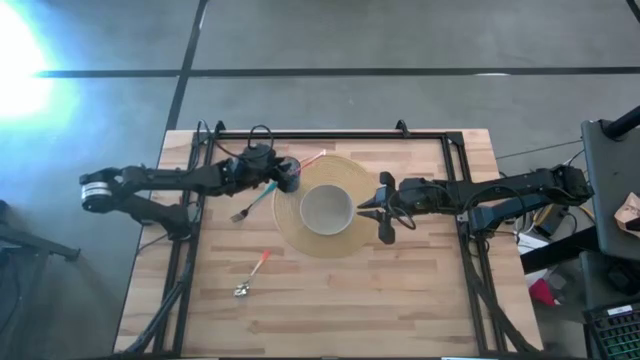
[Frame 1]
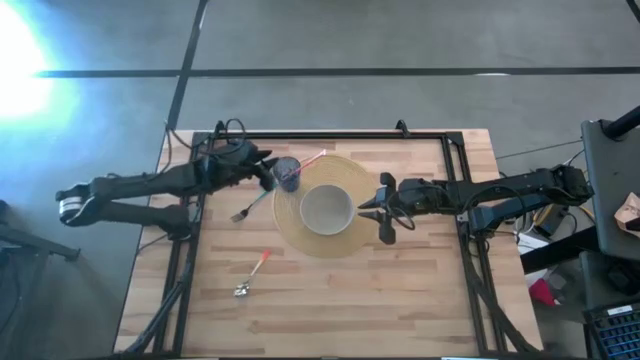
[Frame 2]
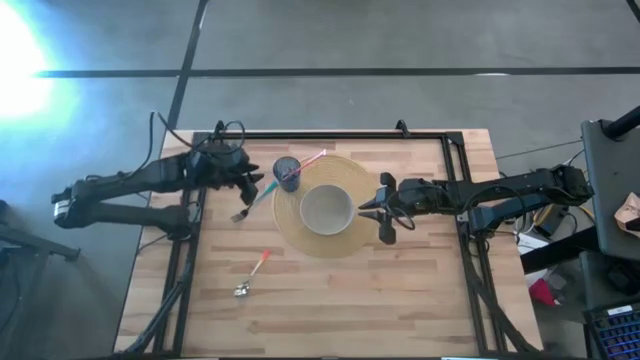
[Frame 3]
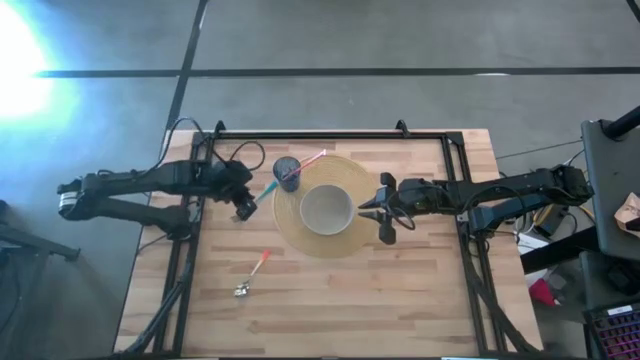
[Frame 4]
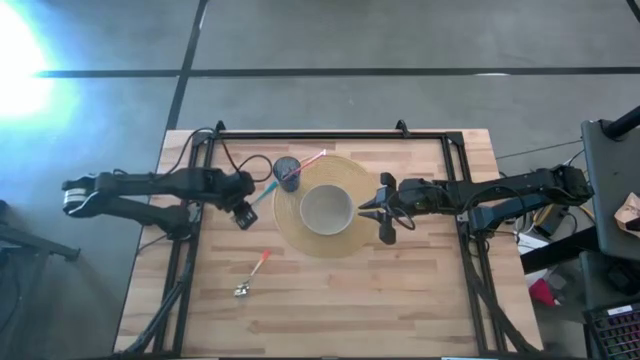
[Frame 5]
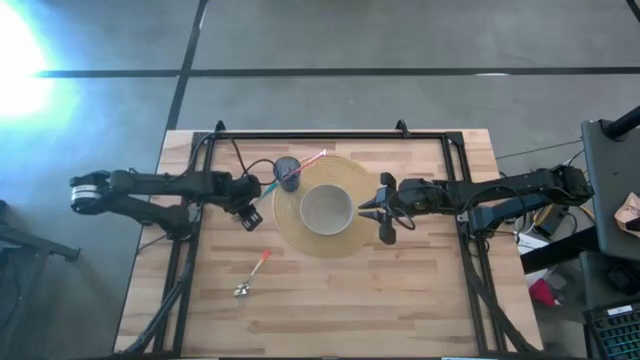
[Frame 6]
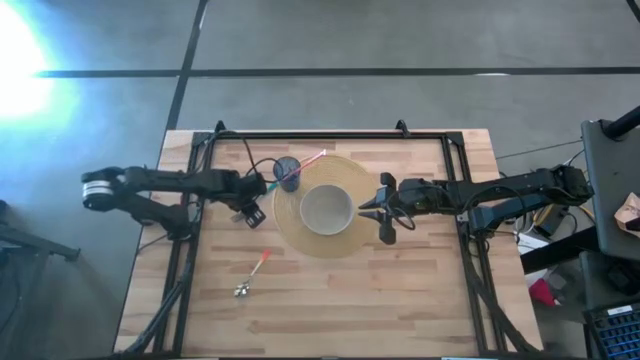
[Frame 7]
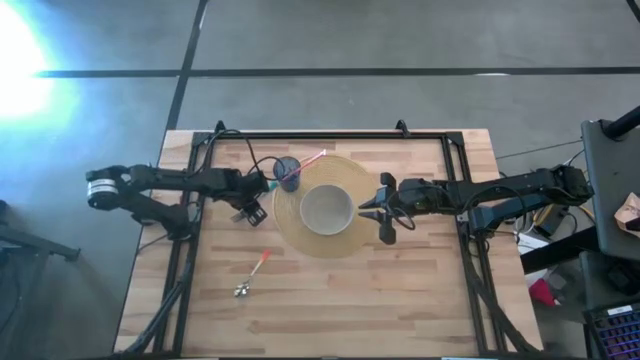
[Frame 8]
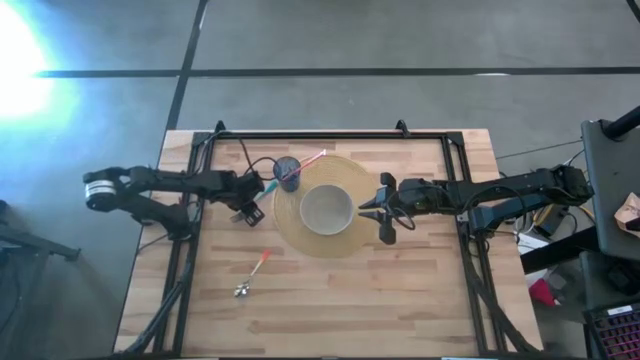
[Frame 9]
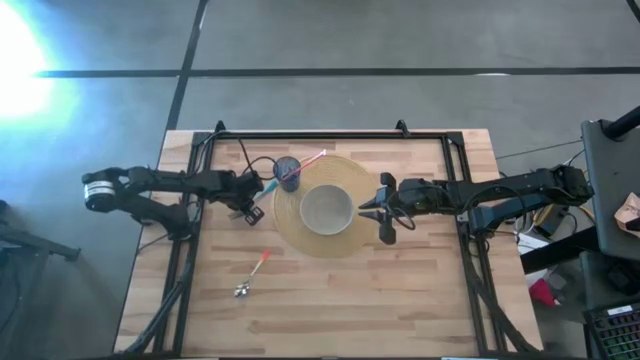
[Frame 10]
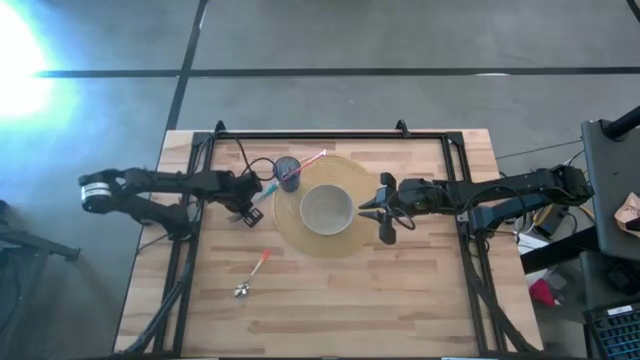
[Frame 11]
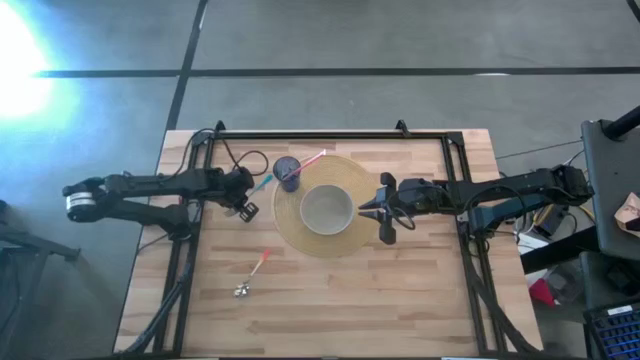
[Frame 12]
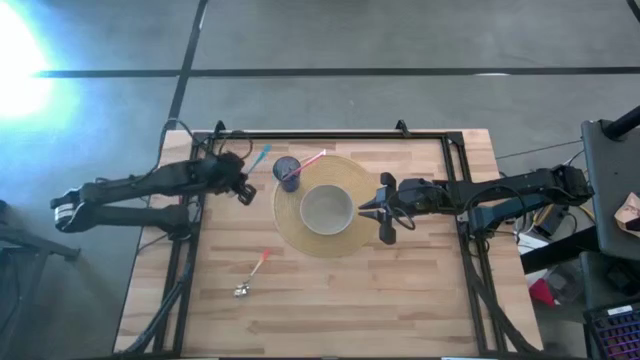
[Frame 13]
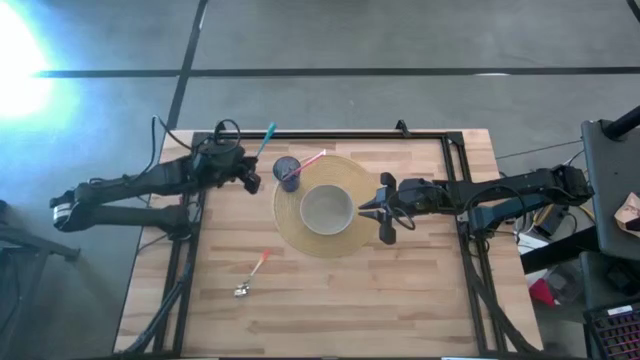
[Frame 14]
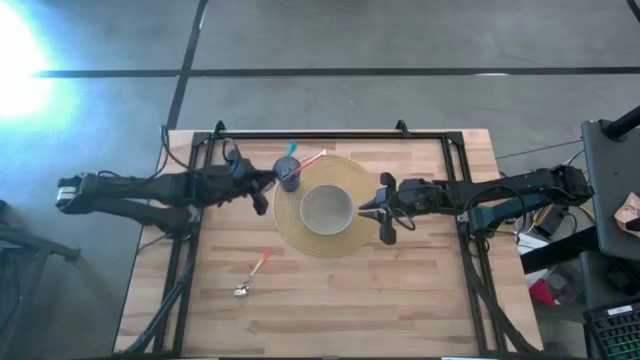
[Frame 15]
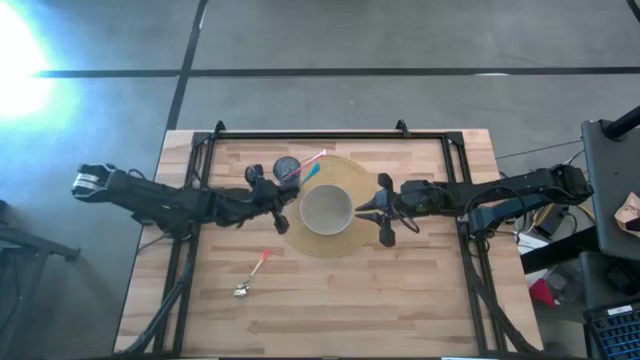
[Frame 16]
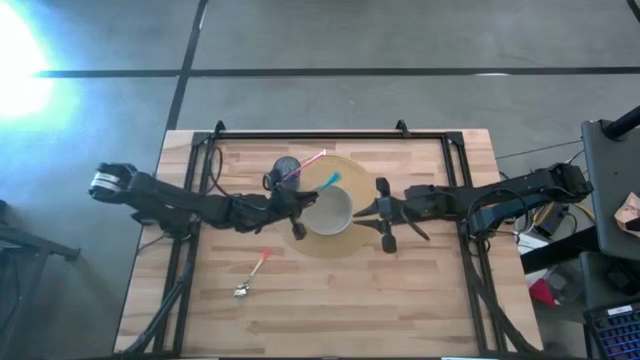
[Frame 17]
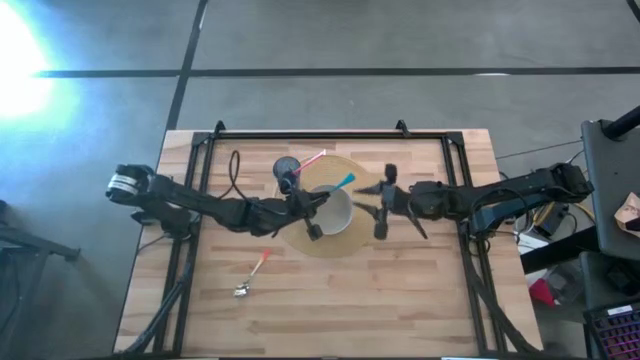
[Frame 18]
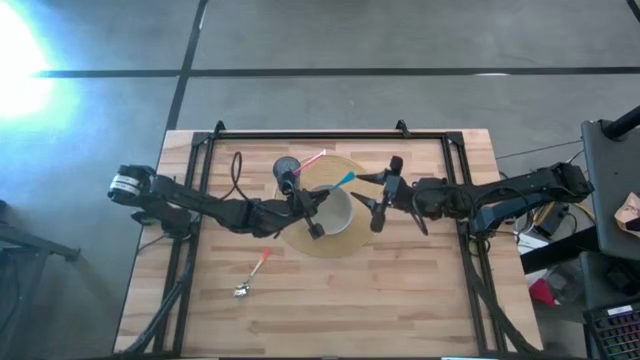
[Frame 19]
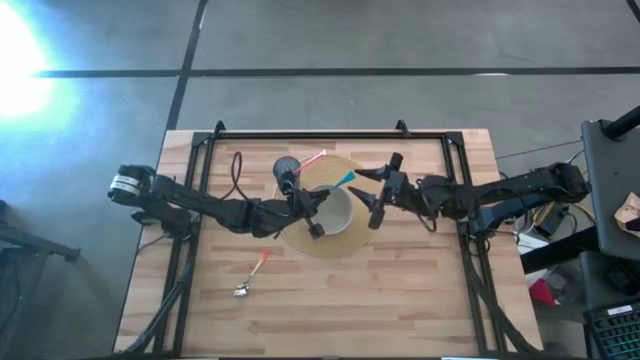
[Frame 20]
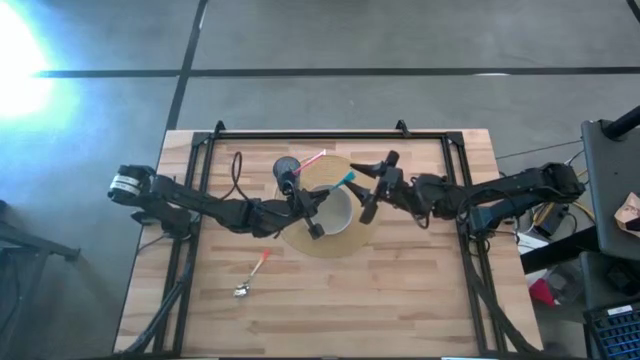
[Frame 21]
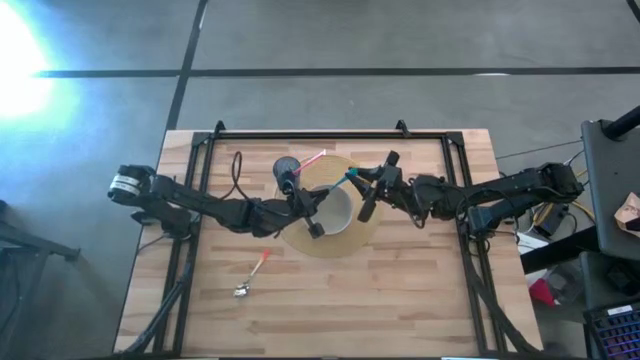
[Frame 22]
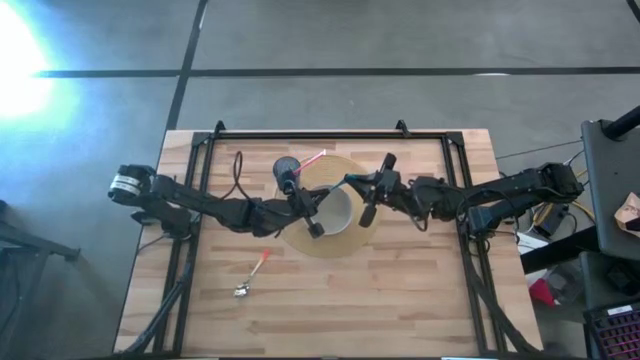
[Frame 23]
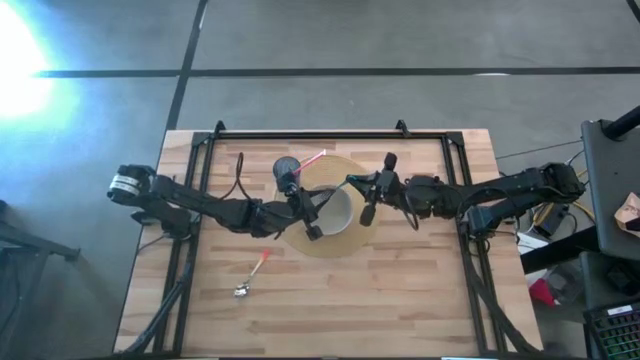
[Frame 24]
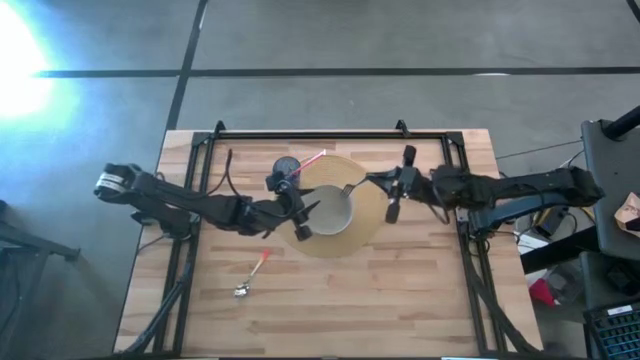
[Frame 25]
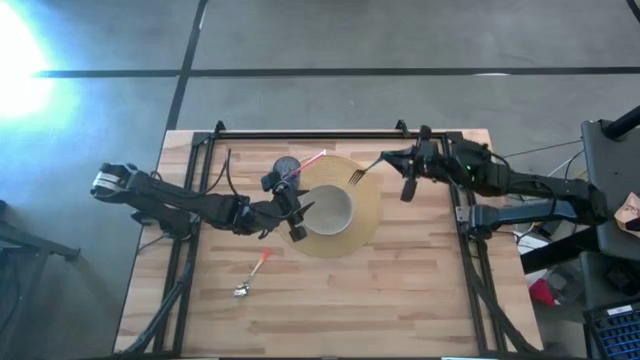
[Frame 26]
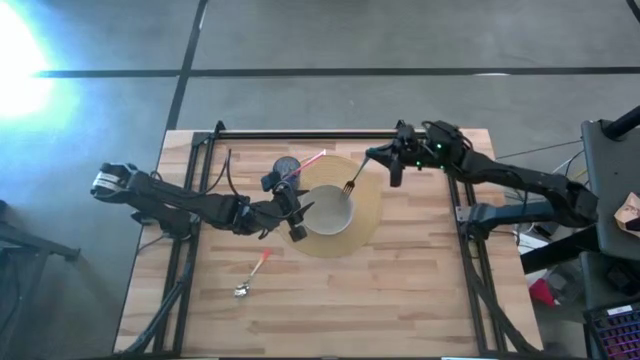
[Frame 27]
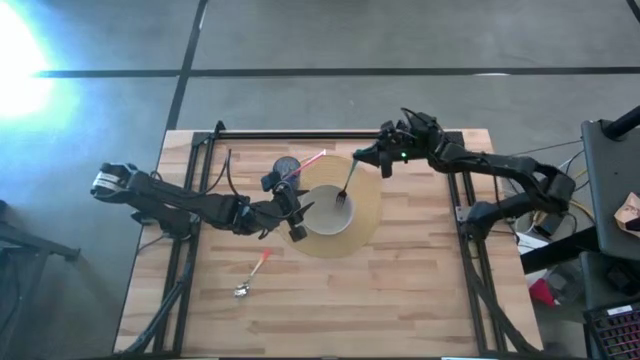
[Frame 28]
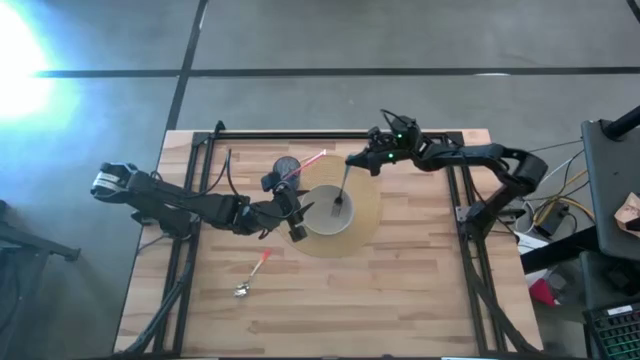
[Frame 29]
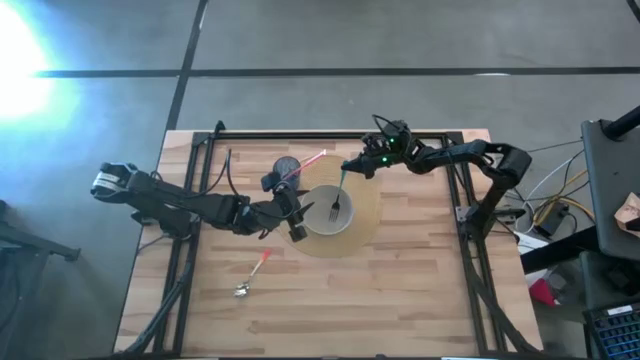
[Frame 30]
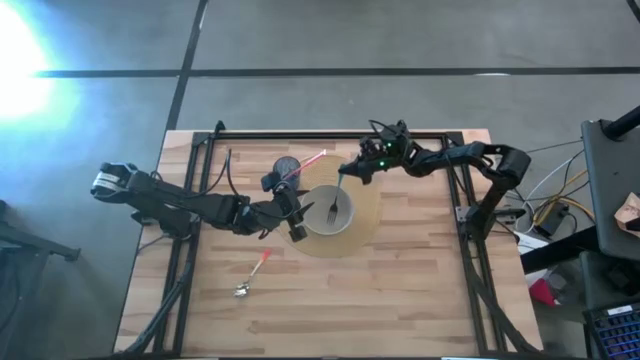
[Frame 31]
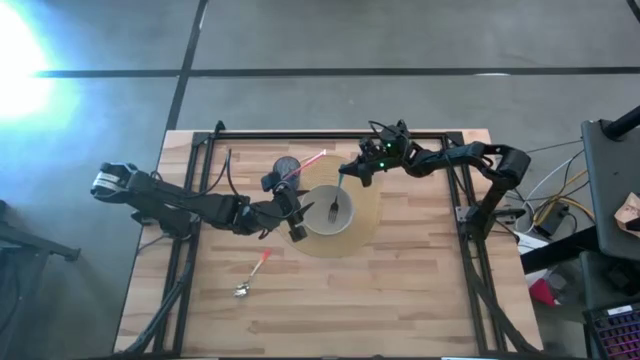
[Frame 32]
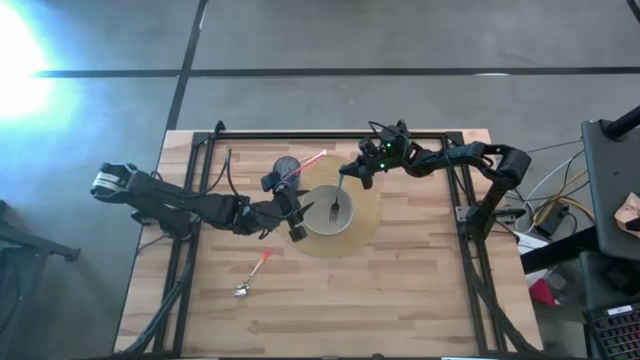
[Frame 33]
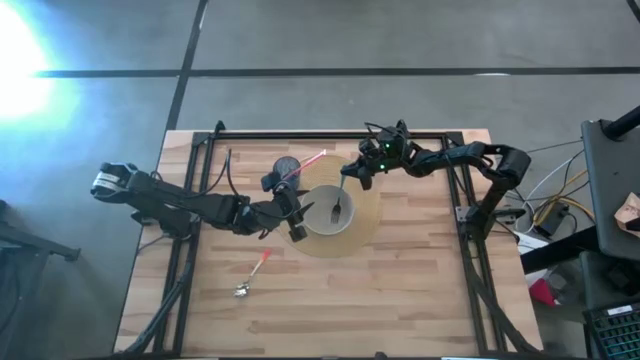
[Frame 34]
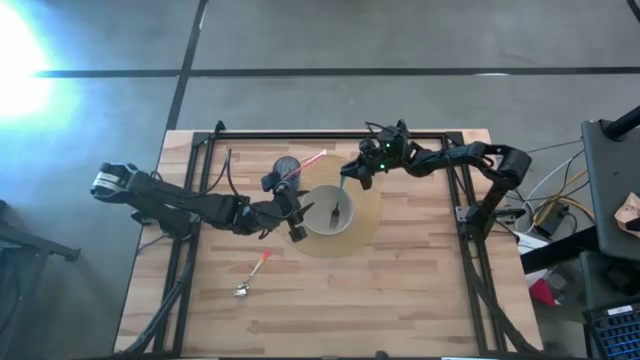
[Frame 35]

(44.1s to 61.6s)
Task: Pick & Place Utensil
Put the blue fork into the gray bowl on the brown mat

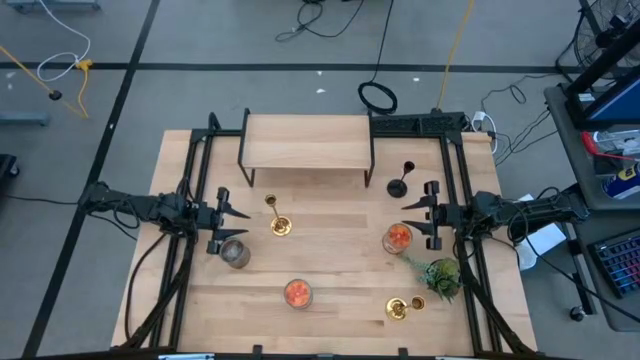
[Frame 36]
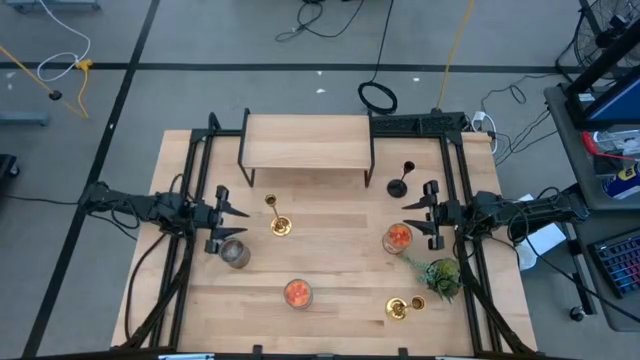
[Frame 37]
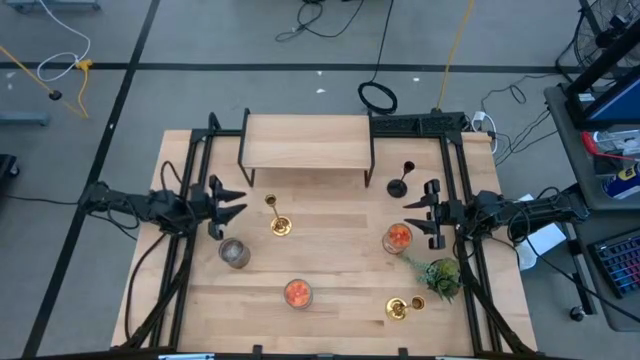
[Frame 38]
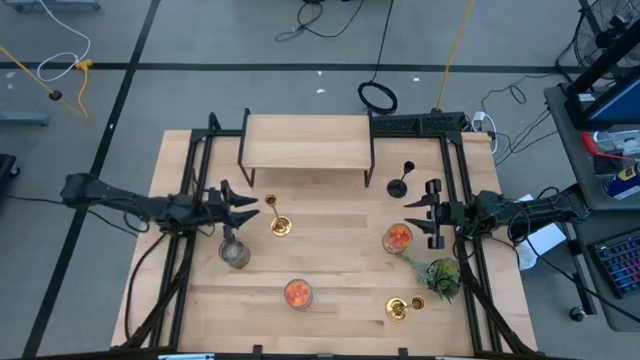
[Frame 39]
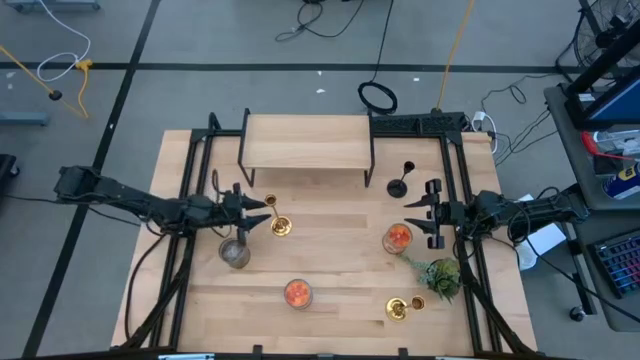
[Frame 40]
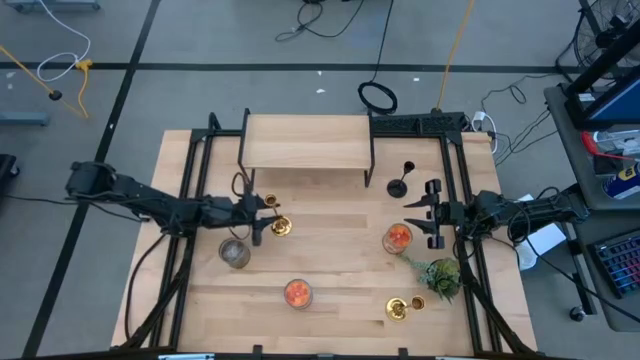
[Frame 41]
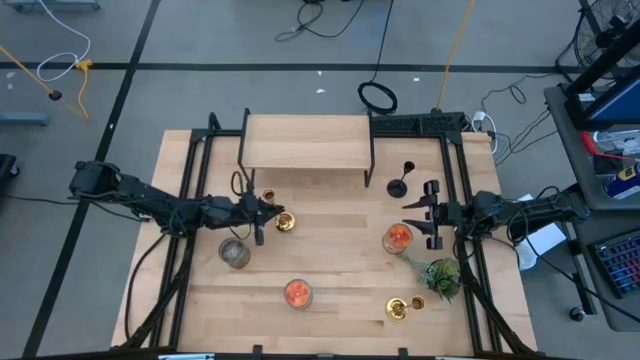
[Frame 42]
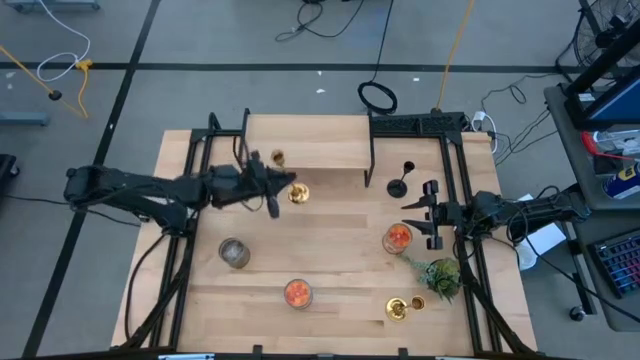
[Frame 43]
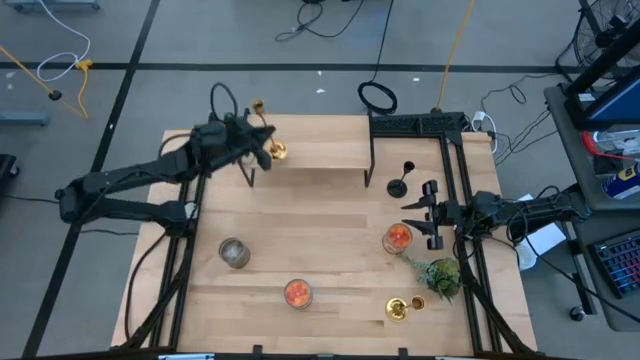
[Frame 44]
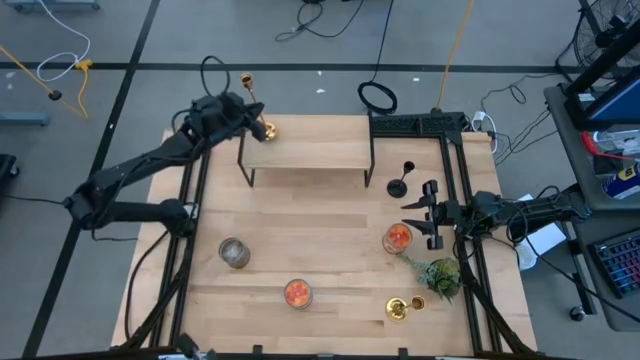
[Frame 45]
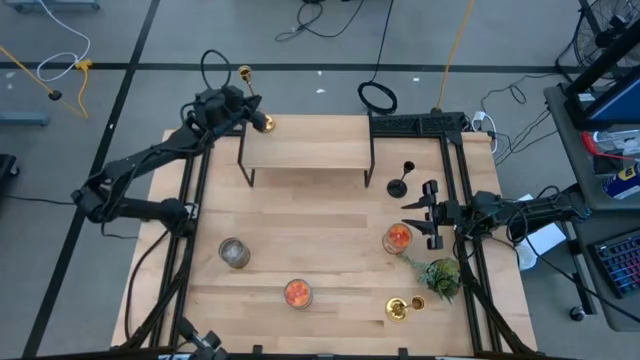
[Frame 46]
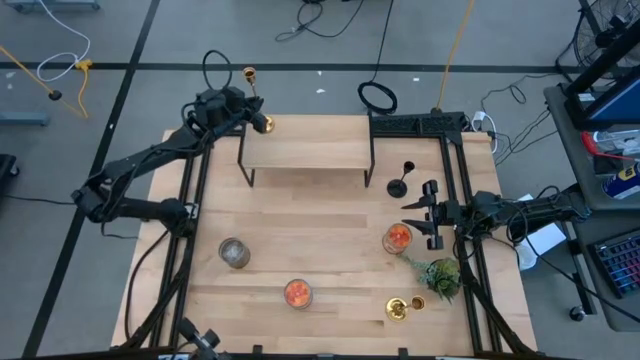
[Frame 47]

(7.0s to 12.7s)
Task: Pick & Place candle stick holders
Put the top light brown candleholder on the shelf
